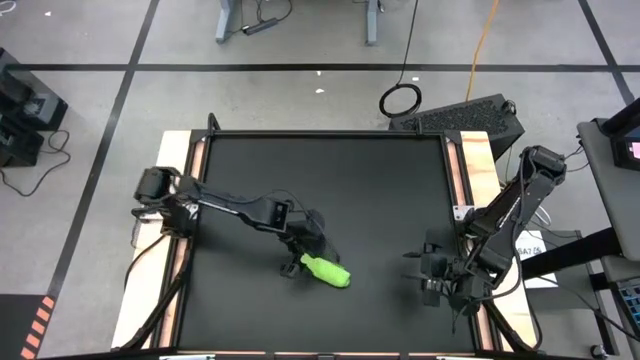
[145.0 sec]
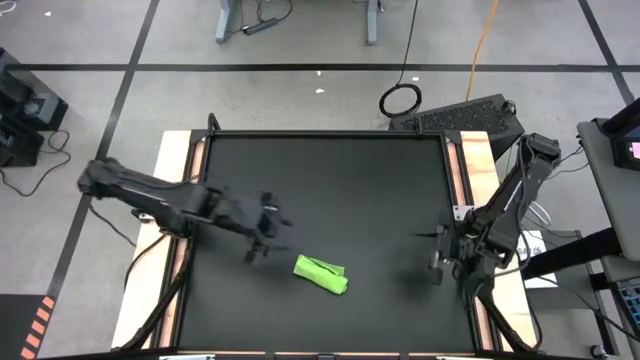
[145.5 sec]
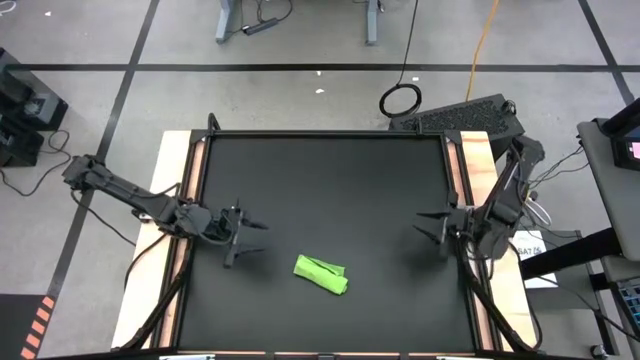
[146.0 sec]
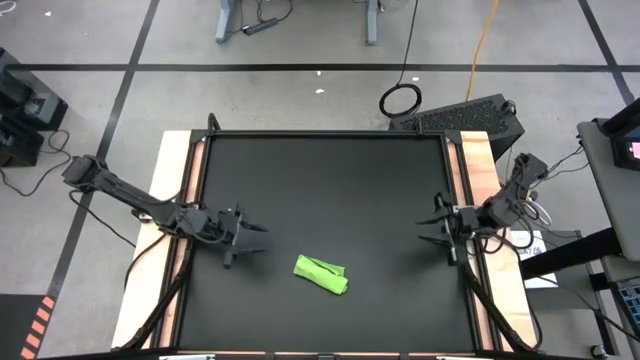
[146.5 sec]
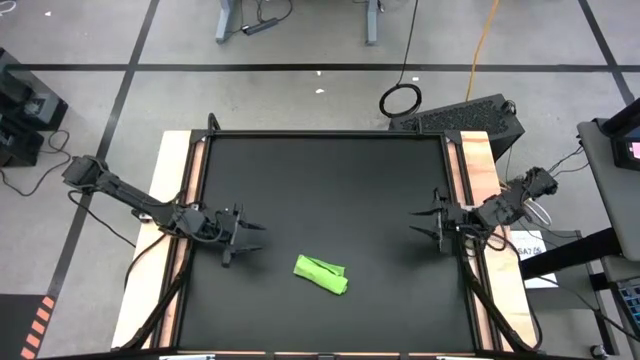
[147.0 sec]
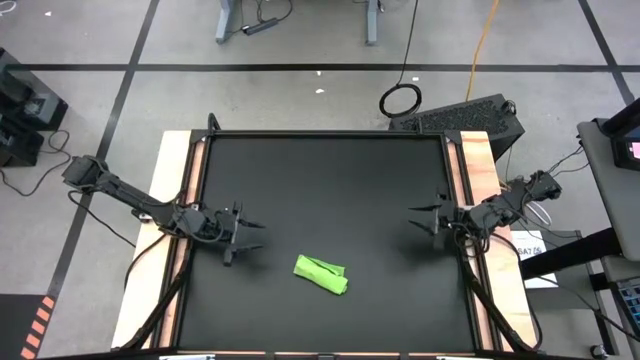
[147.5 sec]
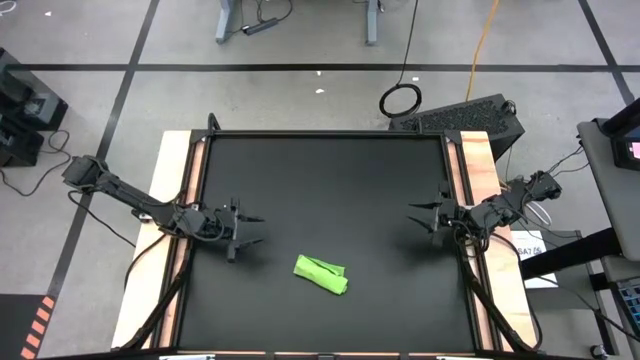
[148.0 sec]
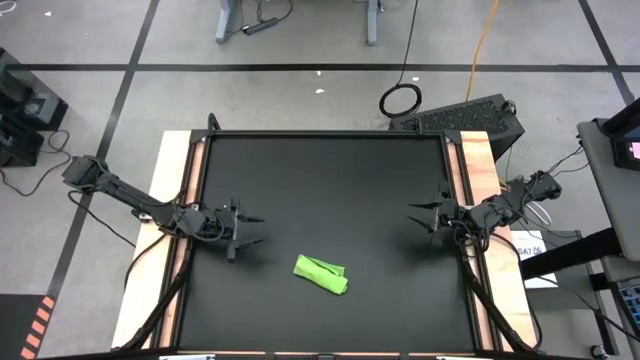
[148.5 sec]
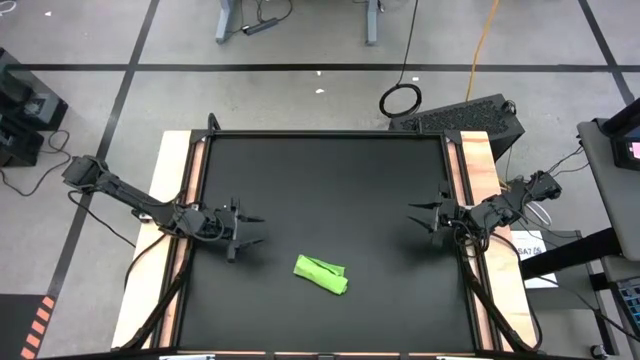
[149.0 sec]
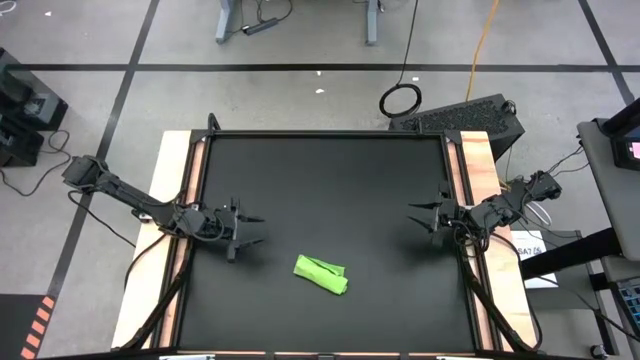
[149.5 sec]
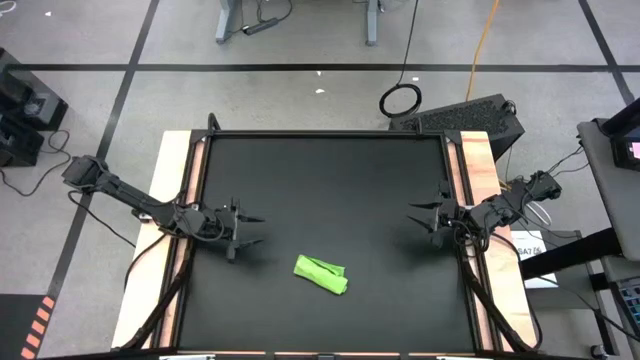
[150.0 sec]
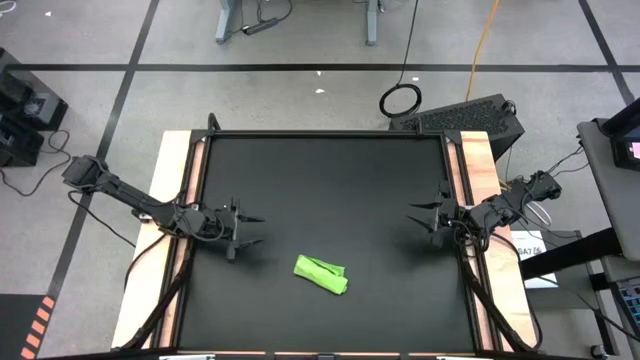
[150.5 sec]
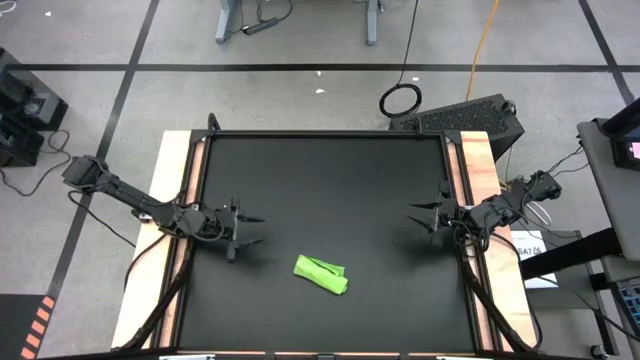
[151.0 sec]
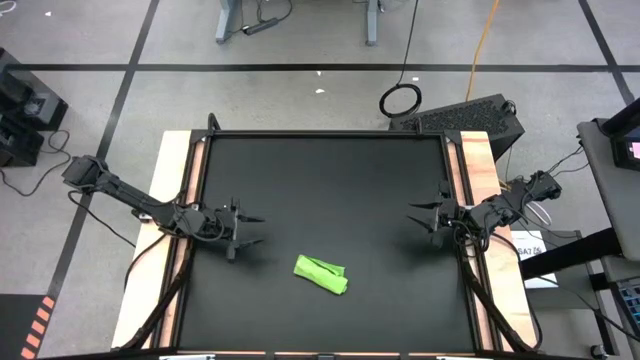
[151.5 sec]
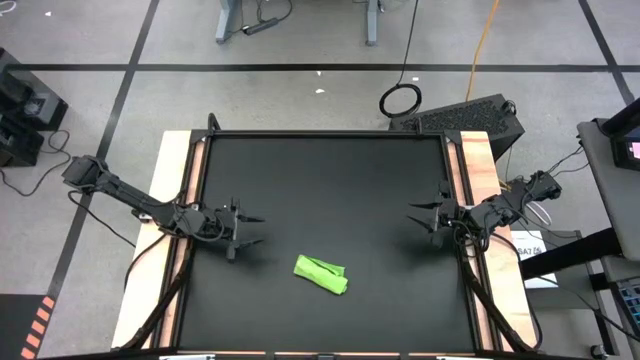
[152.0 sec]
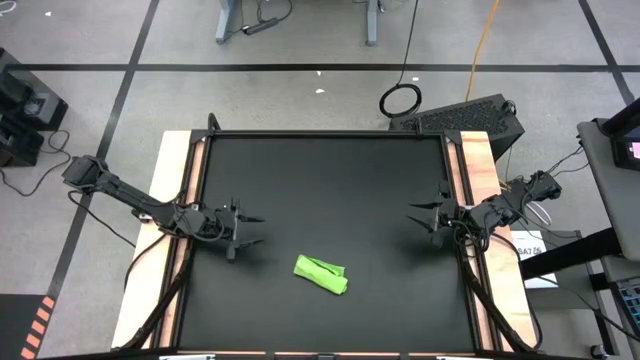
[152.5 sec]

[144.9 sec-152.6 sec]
Task: Roll towel
Return to Home Position

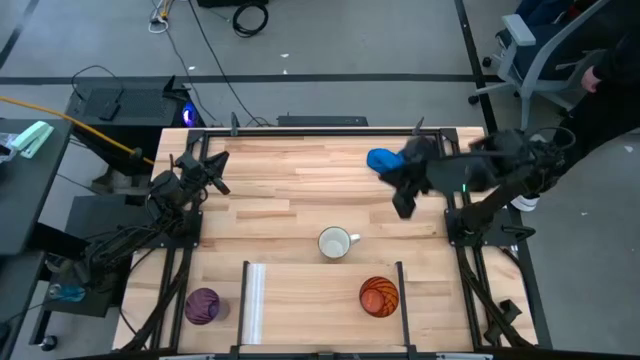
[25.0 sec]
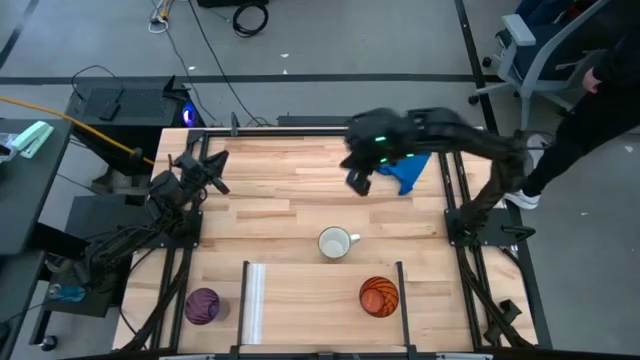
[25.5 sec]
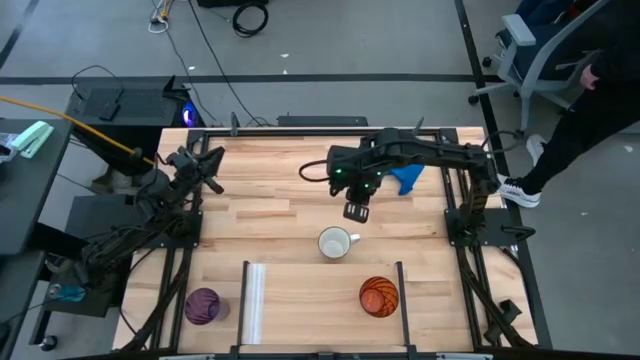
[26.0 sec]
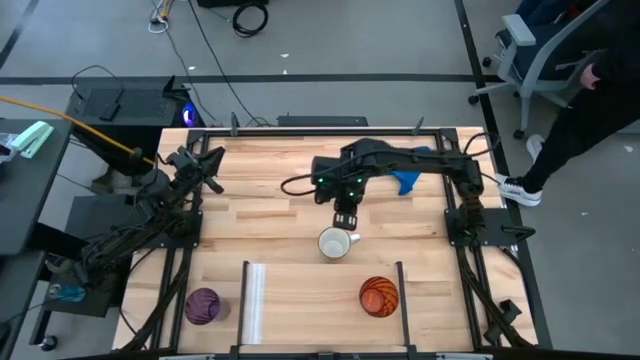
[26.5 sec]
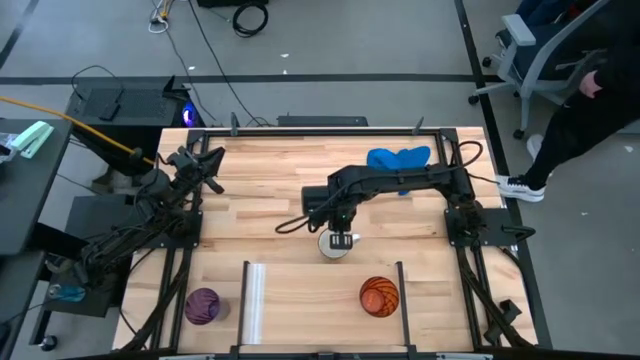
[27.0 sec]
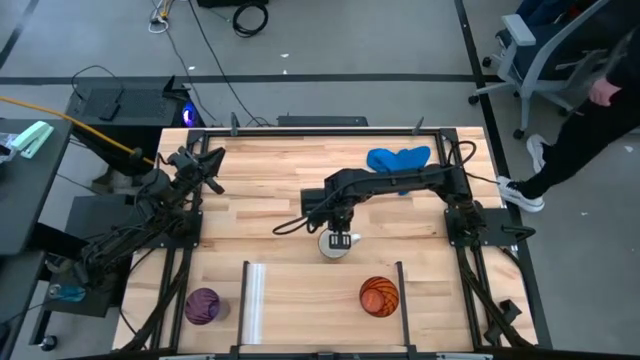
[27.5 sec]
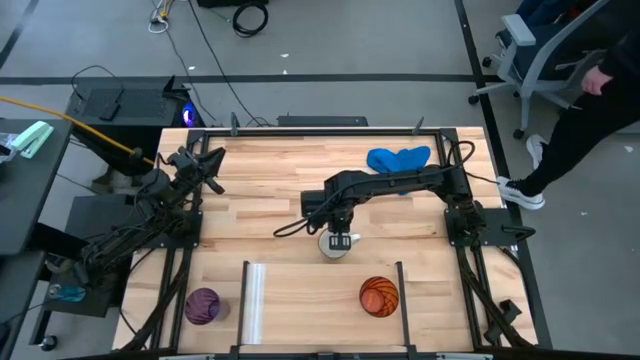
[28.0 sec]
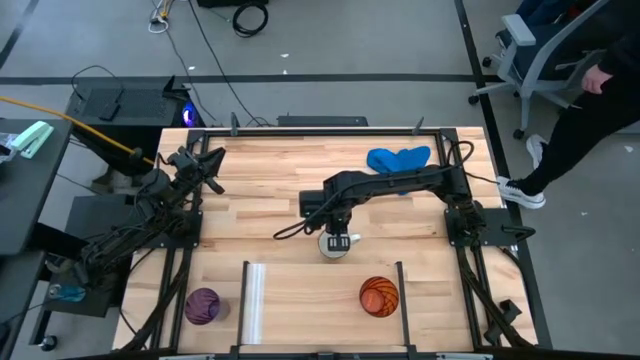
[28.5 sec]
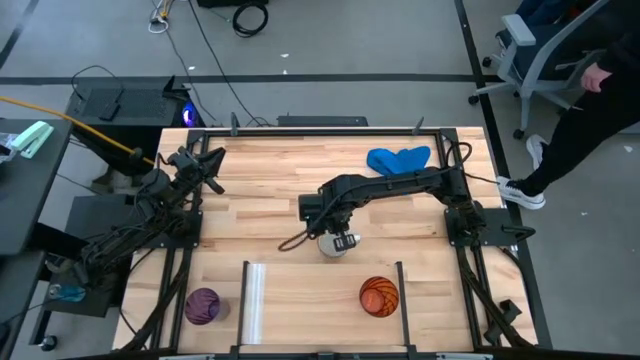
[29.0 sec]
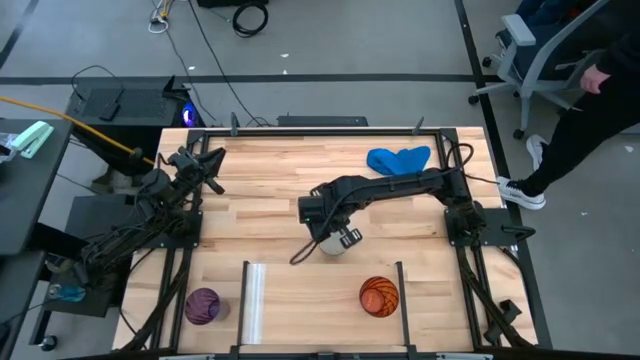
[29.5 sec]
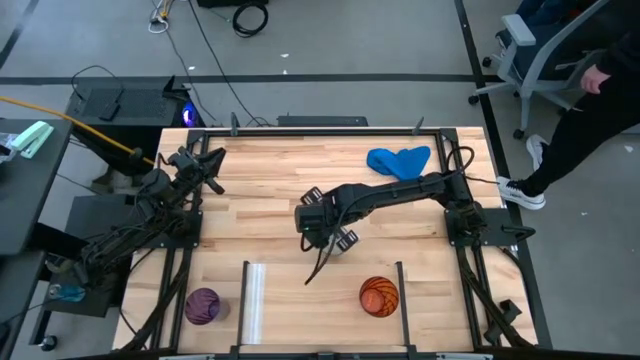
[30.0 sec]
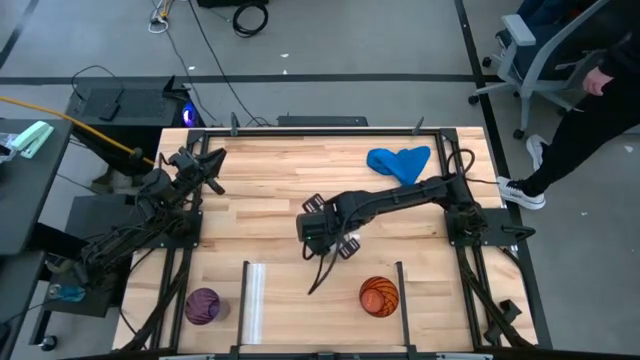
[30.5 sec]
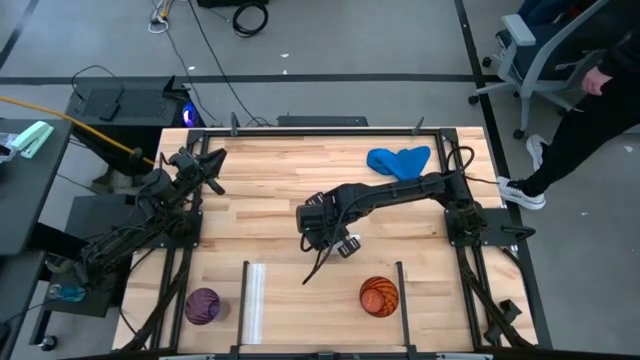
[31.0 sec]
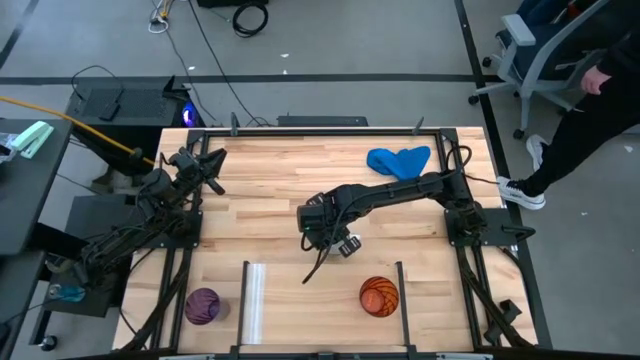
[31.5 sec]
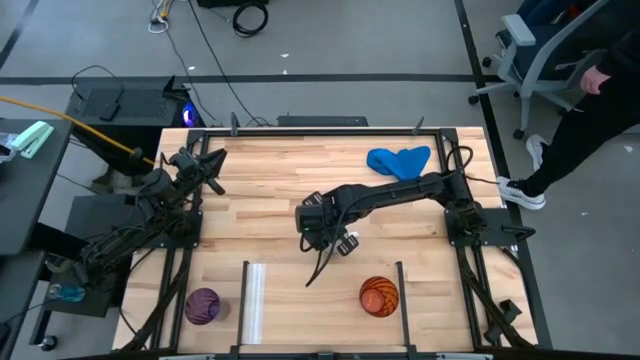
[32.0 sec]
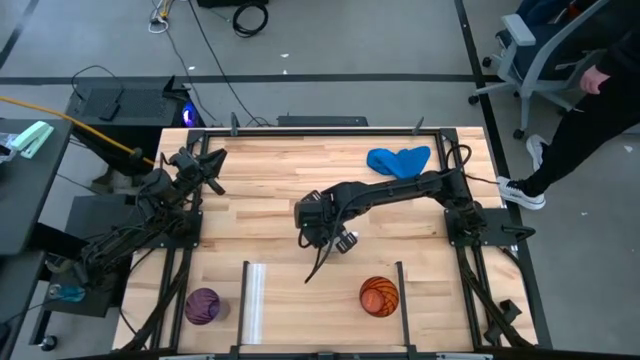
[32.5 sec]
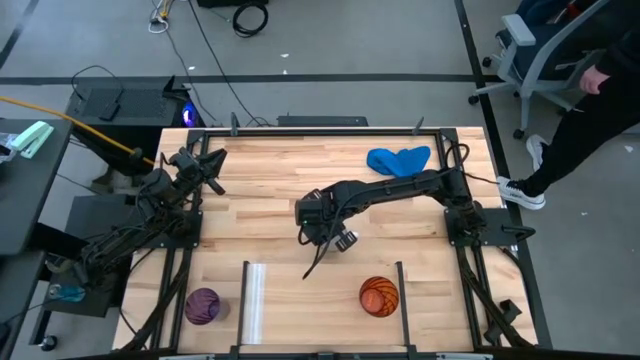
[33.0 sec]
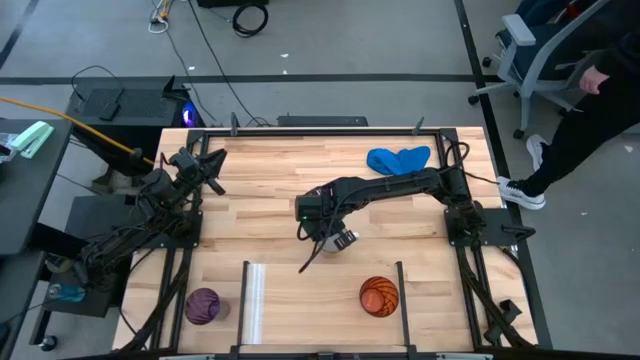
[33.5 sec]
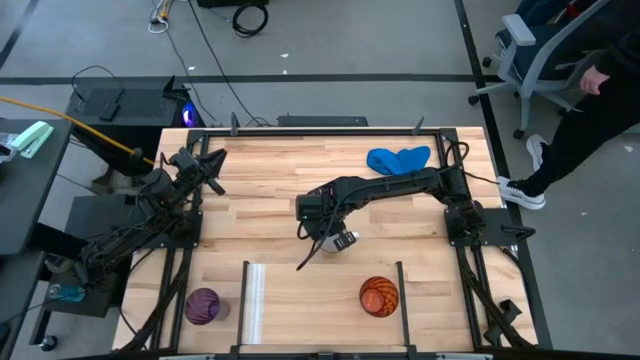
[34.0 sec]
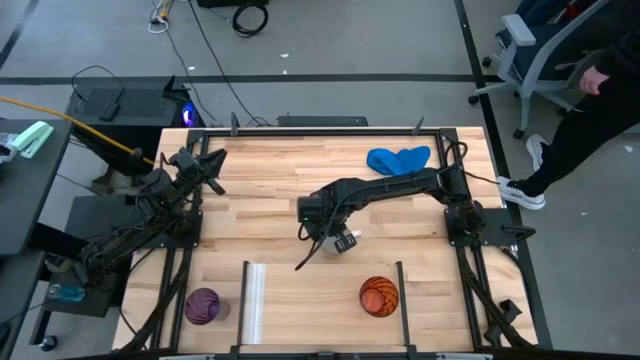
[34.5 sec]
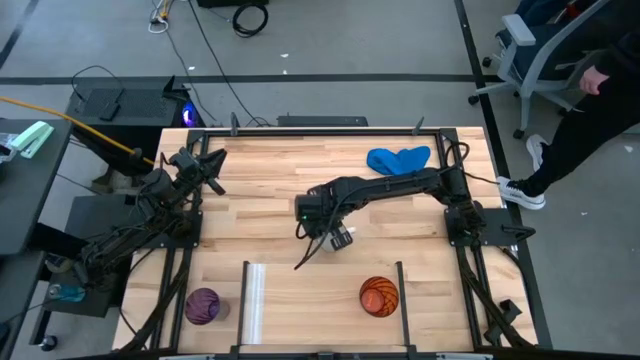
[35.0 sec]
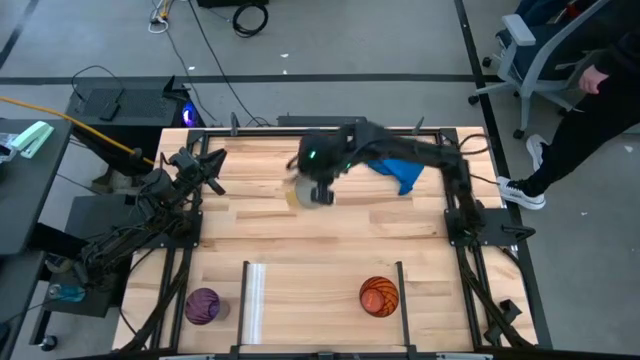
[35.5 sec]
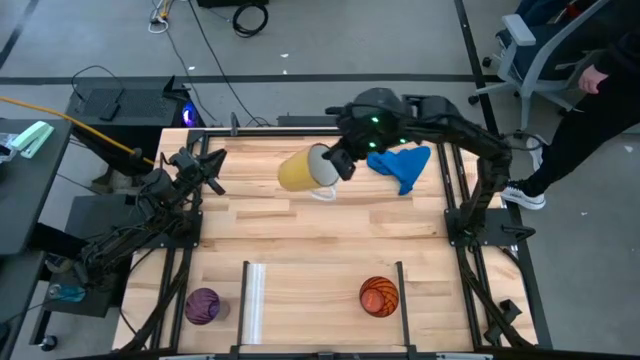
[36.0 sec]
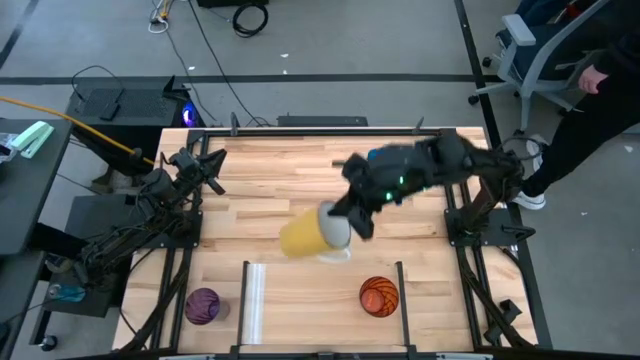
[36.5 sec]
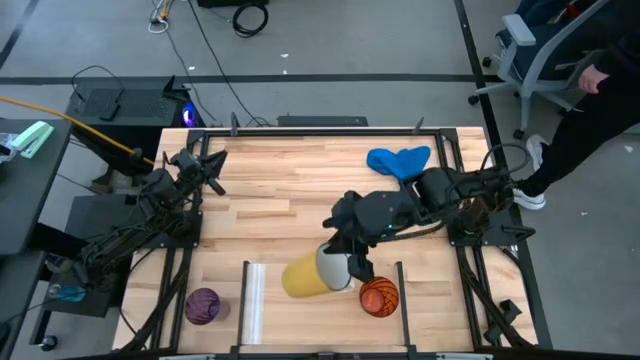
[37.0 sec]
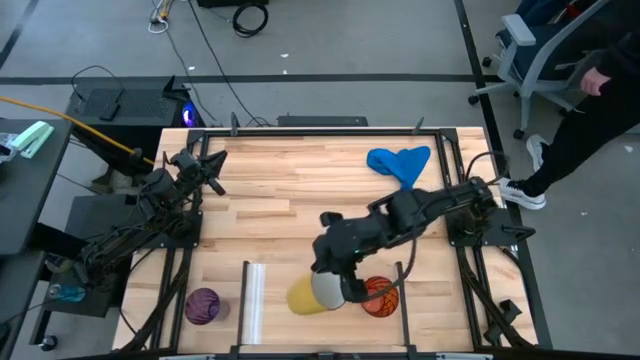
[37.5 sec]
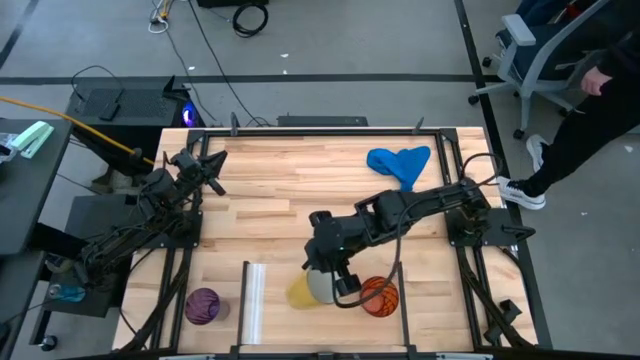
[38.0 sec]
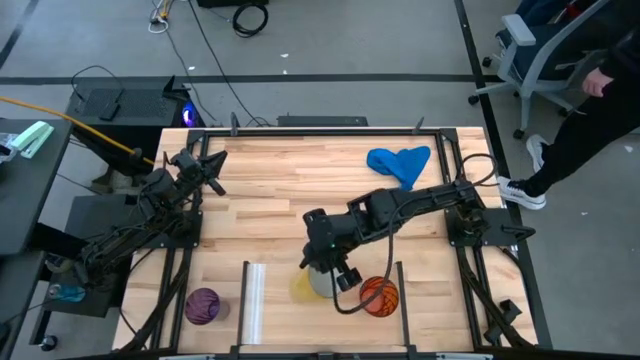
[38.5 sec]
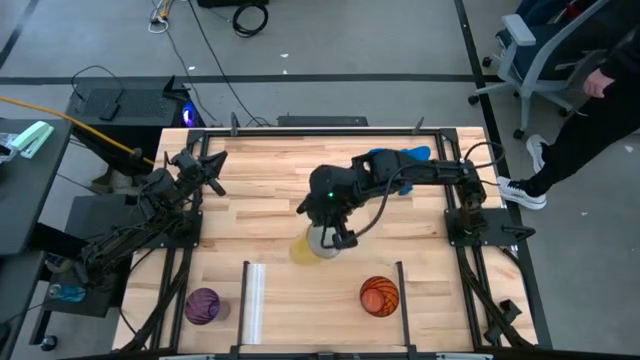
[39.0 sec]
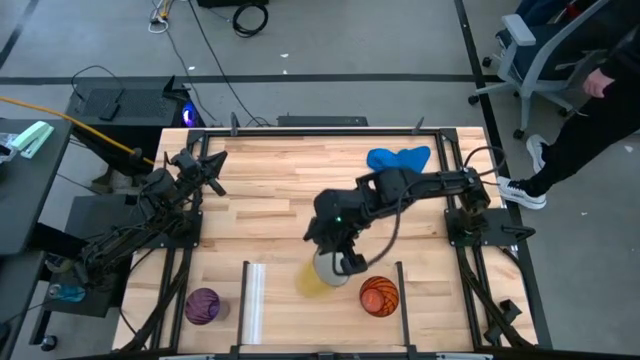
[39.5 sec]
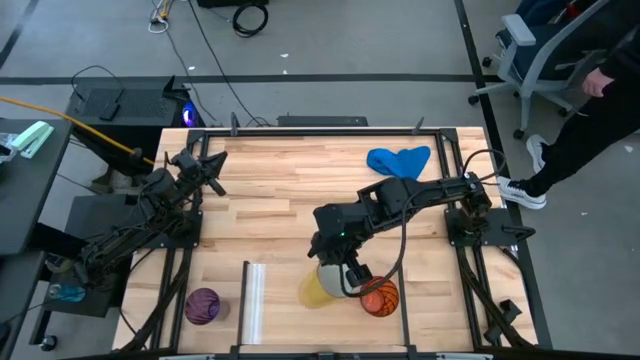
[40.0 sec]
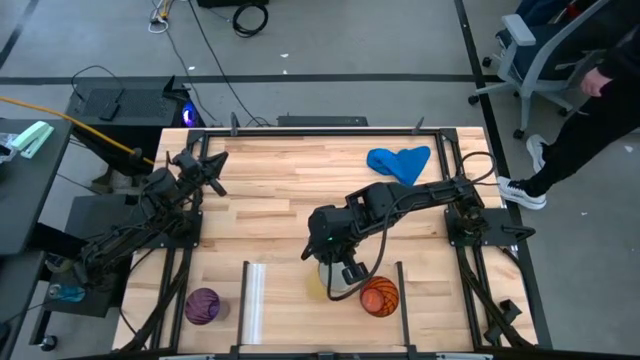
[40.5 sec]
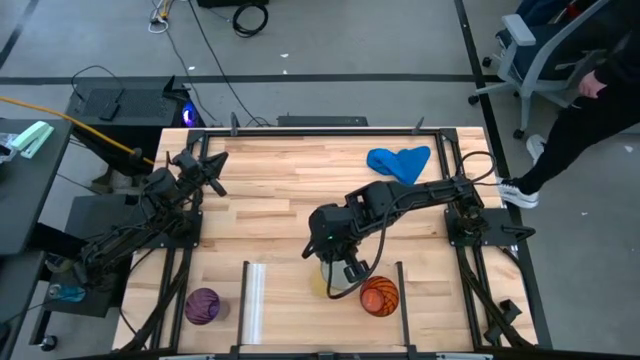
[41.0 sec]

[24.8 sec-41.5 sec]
Task: Stack small to large cups/mugs on shelf
Put the yellow mug on the shelf
